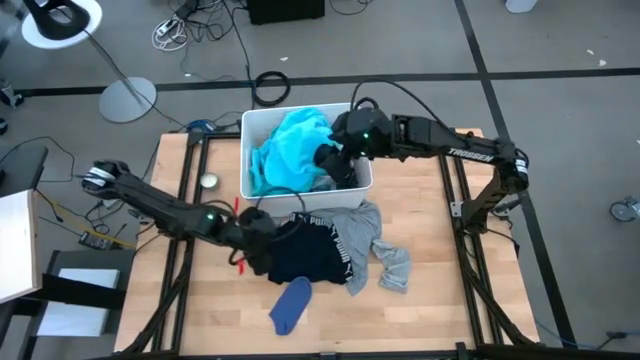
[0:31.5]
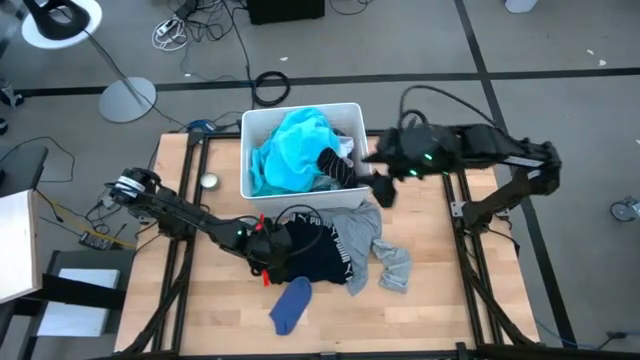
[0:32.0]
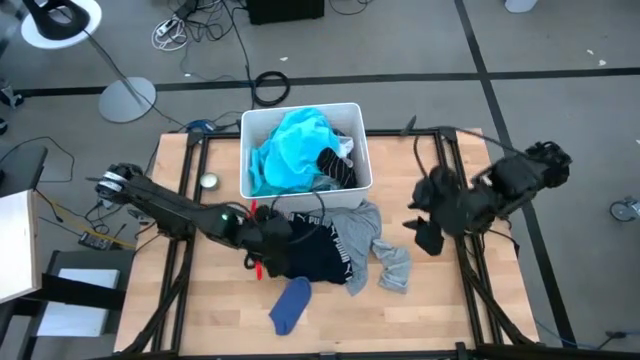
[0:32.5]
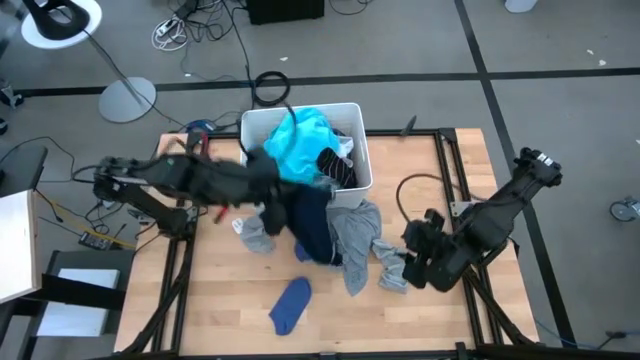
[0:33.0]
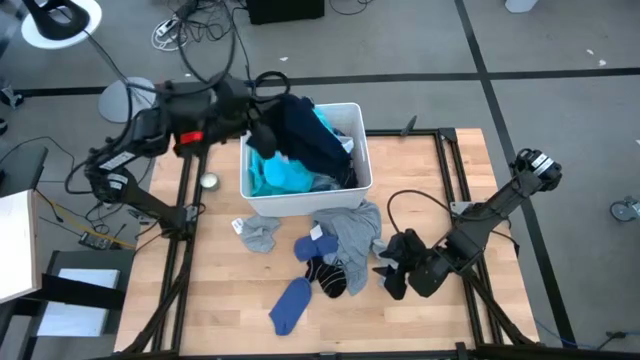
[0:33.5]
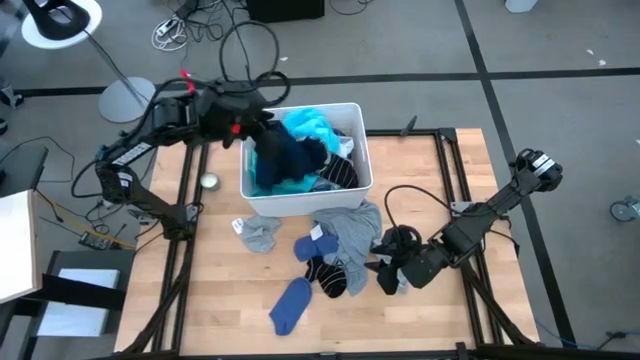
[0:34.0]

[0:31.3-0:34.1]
Task: Sort clothes
Put the black boxers into the white bin

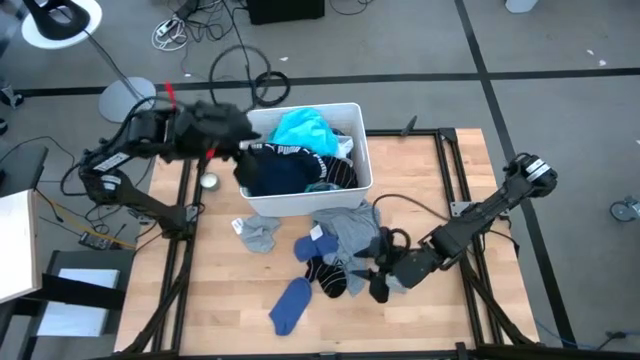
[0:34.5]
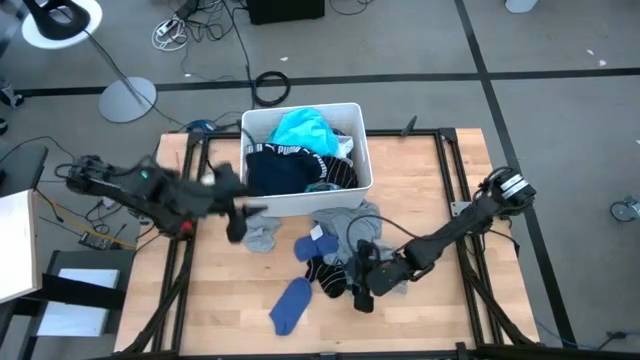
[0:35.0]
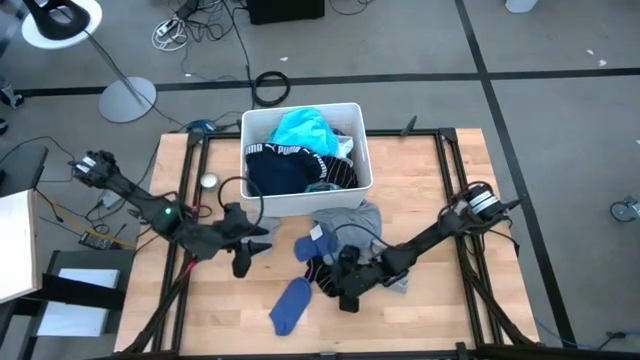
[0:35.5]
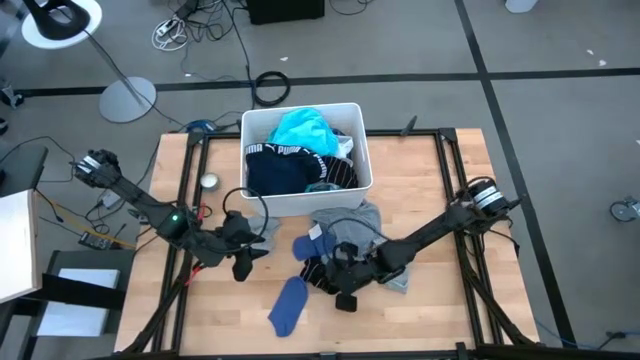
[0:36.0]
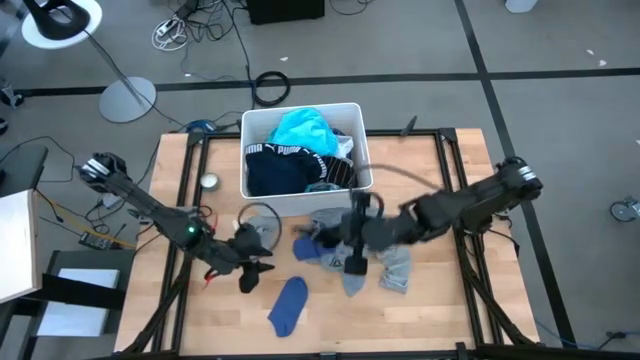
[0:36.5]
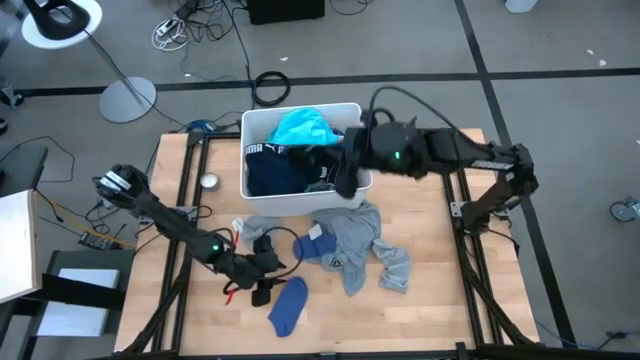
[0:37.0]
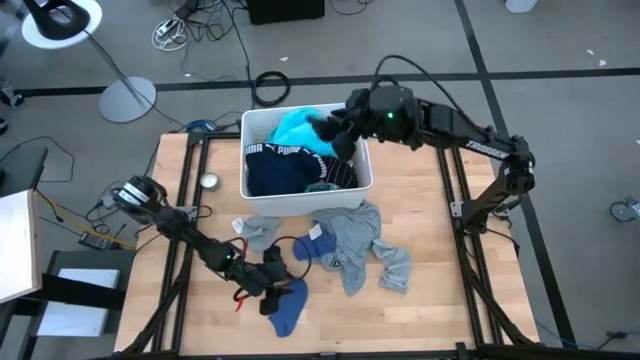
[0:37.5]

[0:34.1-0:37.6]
Put the black sock into the white bin

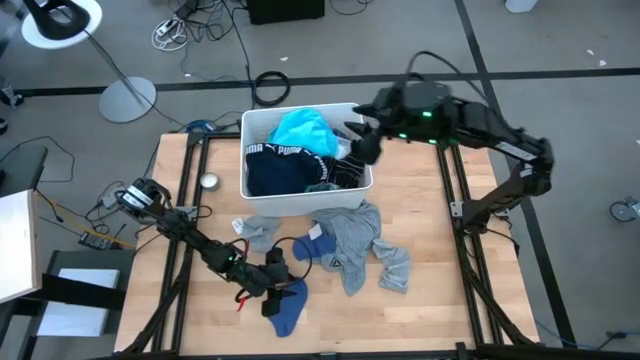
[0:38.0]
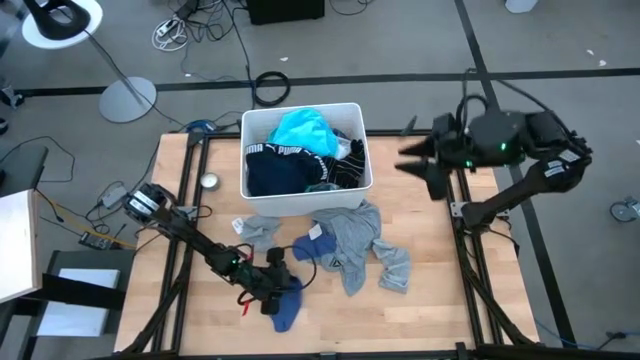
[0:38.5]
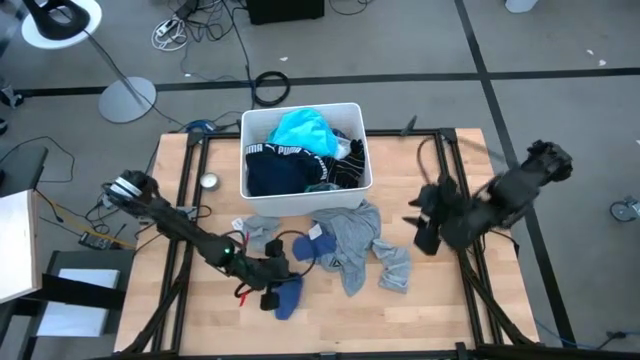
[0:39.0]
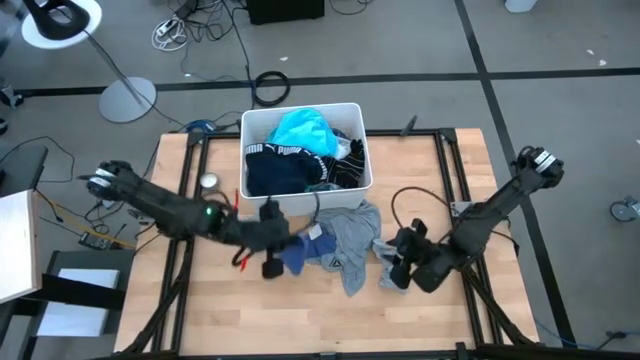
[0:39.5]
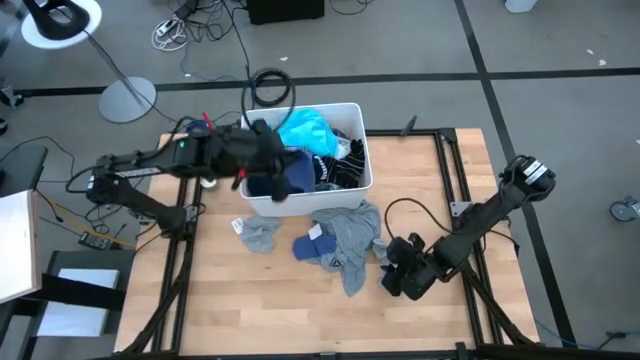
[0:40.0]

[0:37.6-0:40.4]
Put the blue sock into the white bin

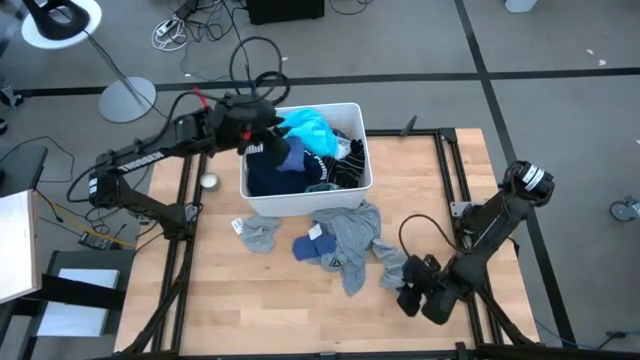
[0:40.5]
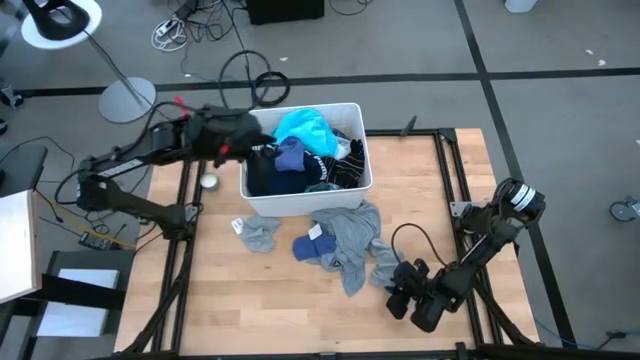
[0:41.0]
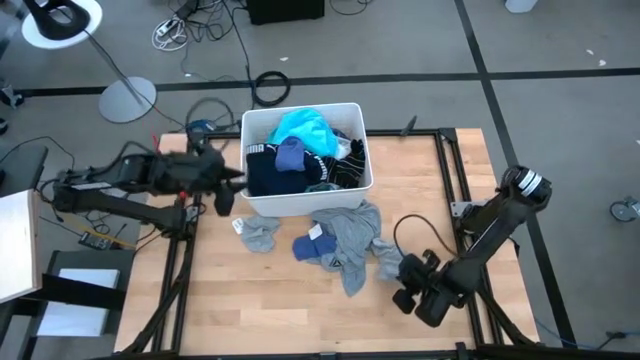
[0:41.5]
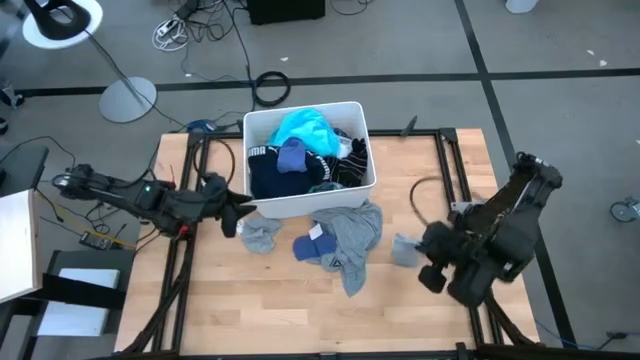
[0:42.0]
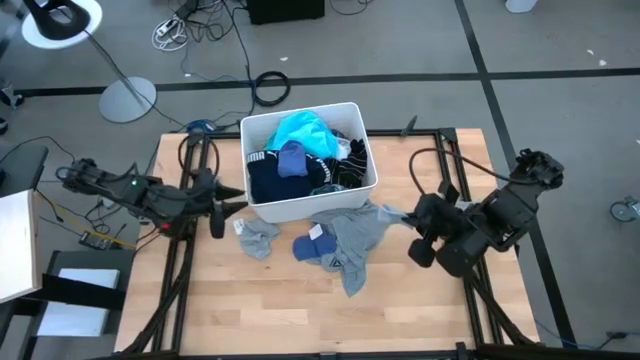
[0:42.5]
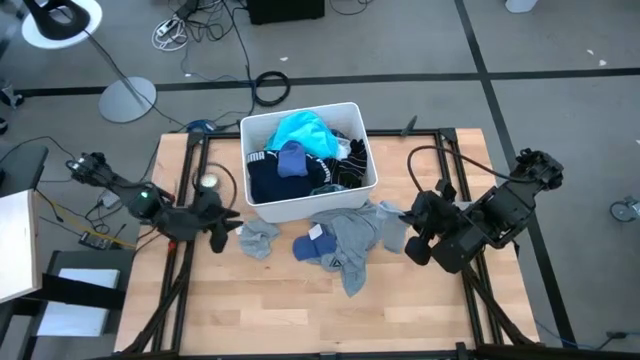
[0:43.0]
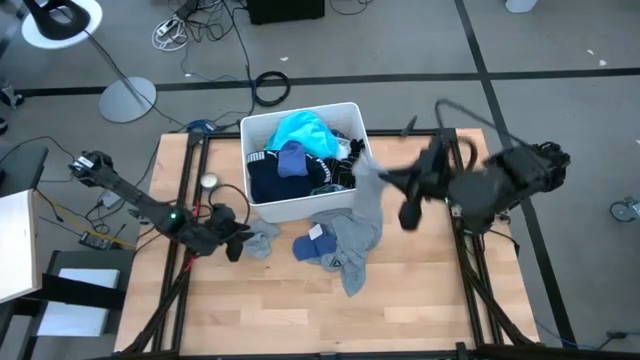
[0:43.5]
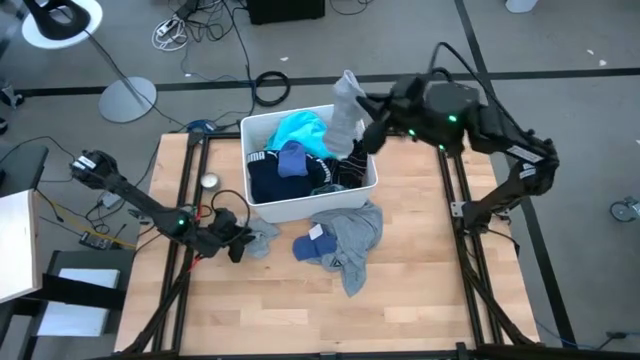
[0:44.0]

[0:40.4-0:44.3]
Put the gray sock into the white bin

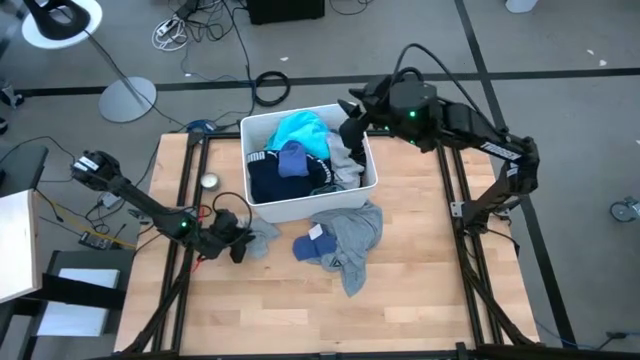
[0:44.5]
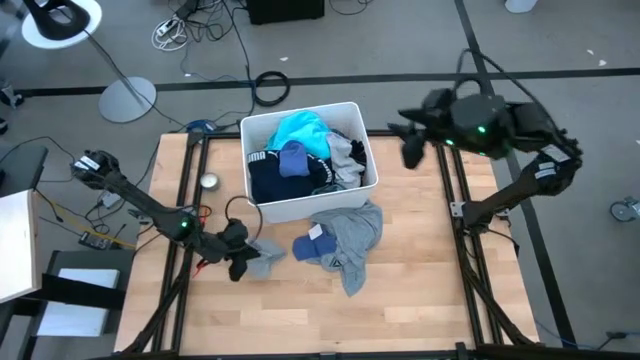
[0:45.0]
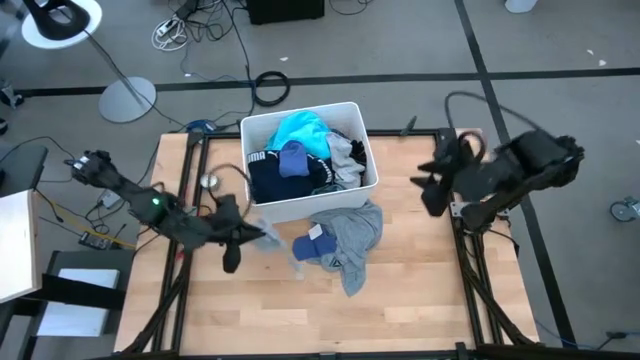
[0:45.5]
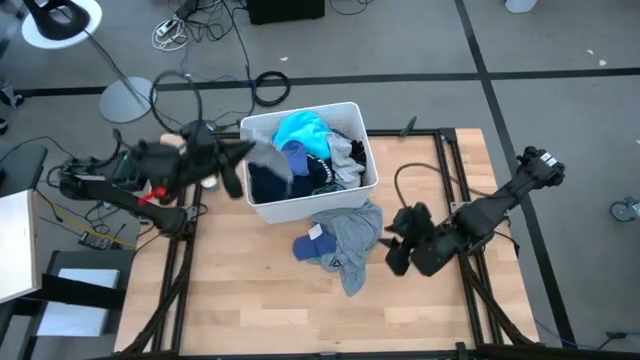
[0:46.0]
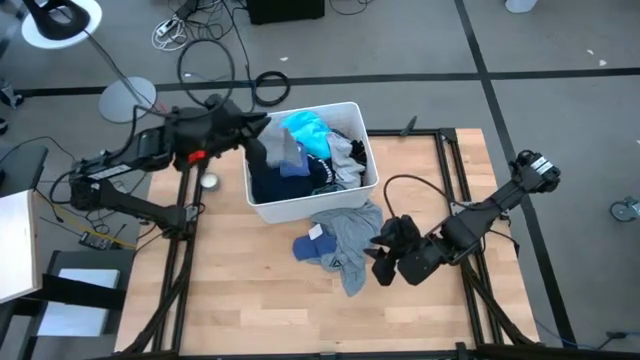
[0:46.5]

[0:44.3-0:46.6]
Put the gray sock into the white bin

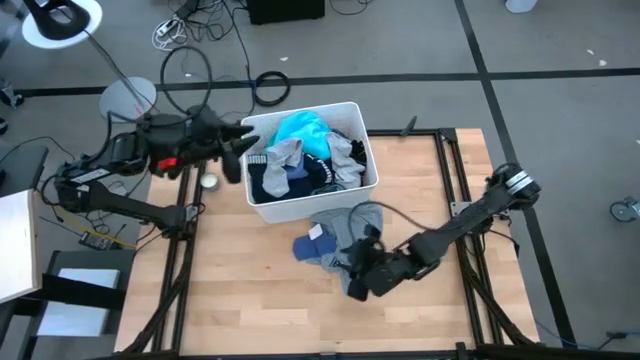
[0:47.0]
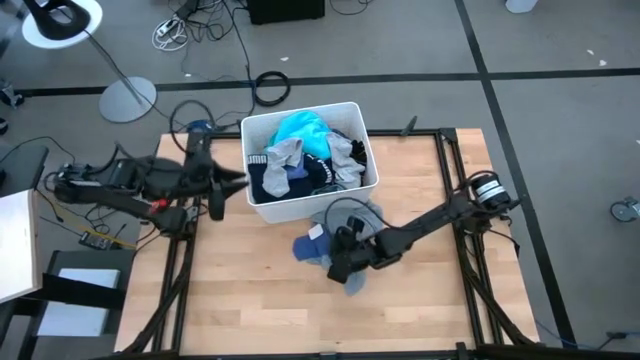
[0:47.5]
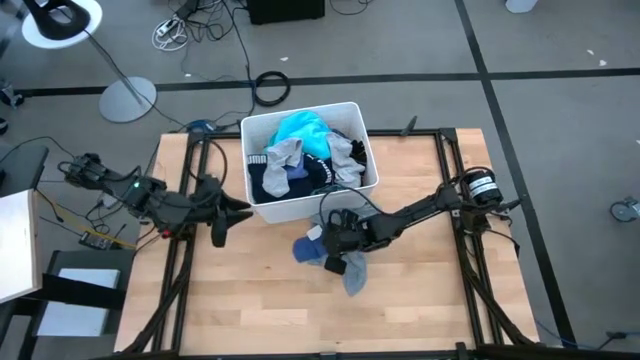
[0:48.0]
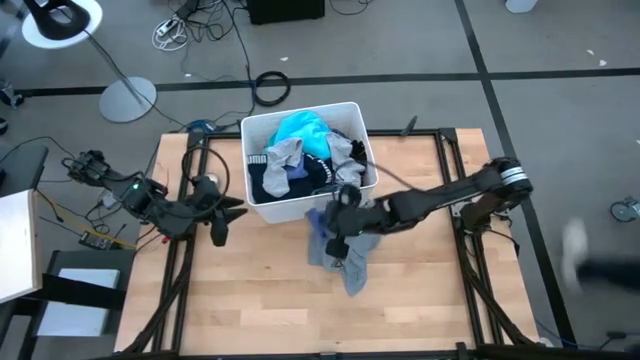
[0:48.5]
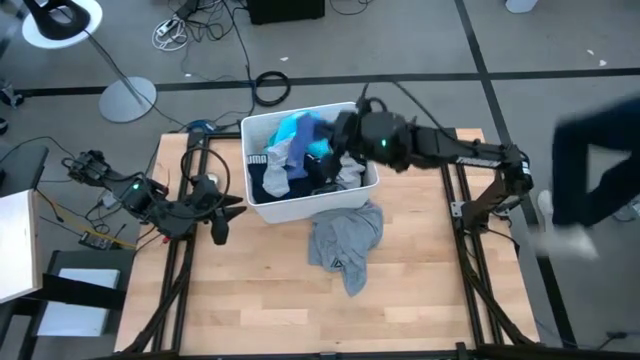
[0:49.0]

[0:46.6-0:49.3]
Put the blue sock into the white bin

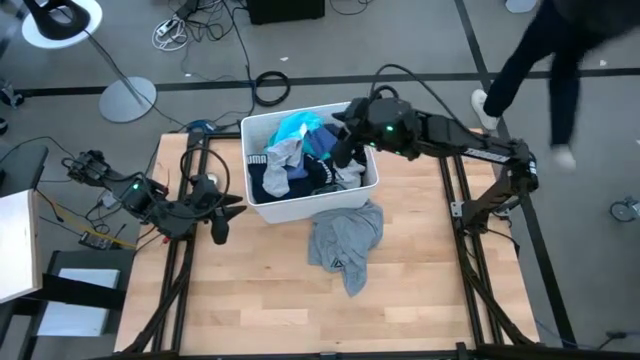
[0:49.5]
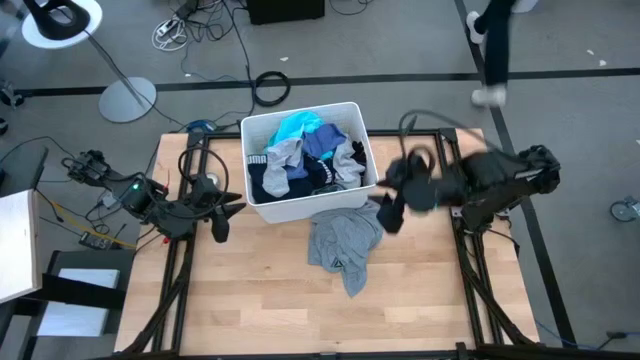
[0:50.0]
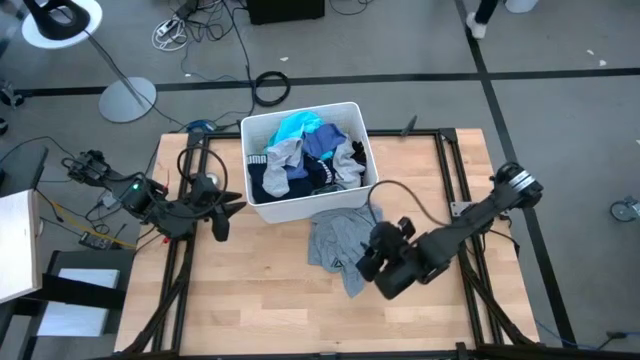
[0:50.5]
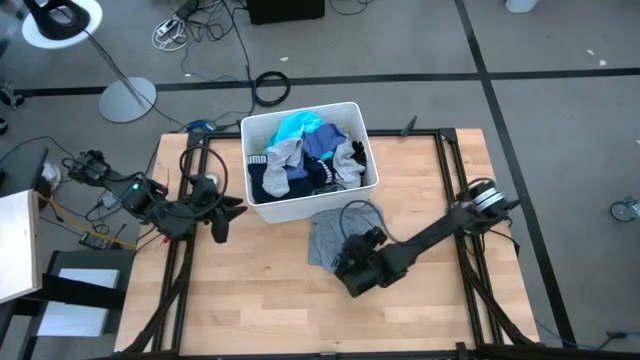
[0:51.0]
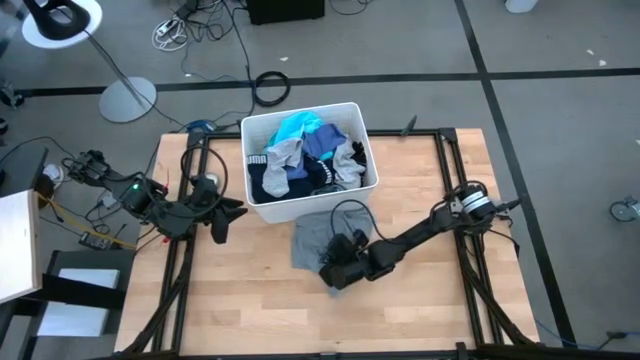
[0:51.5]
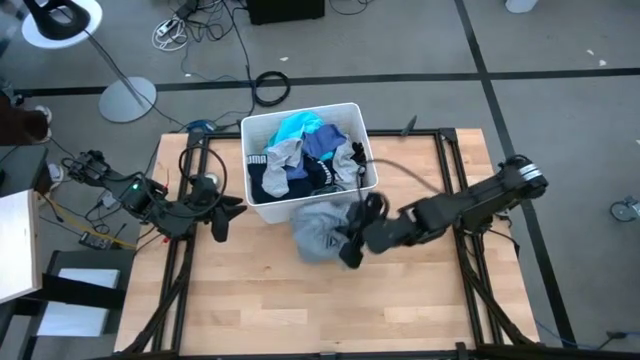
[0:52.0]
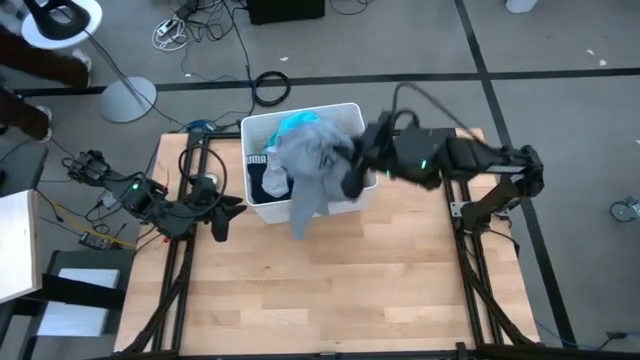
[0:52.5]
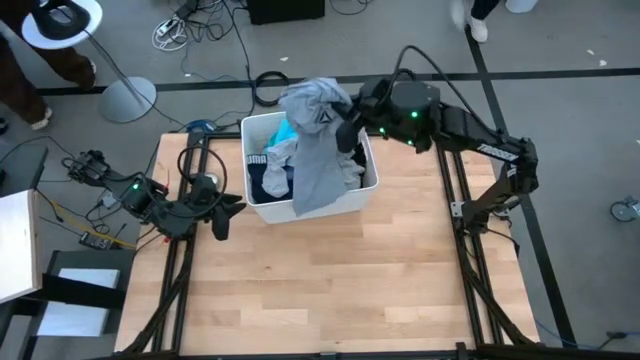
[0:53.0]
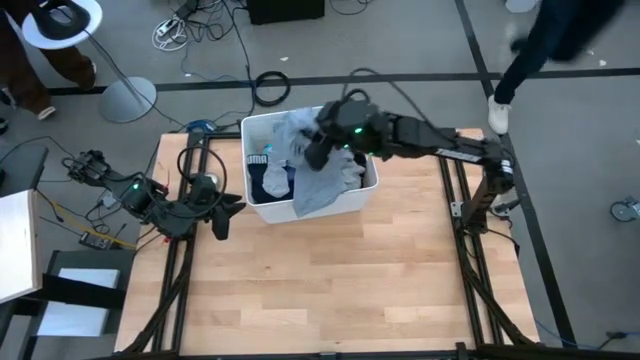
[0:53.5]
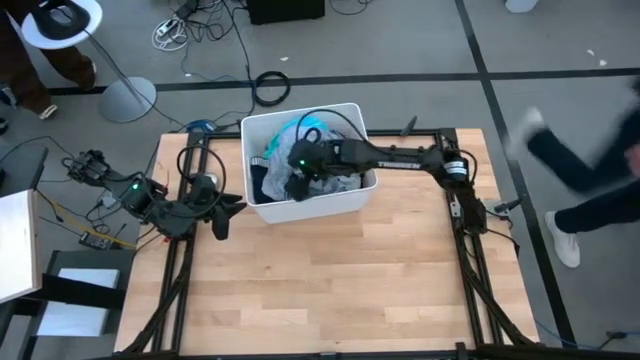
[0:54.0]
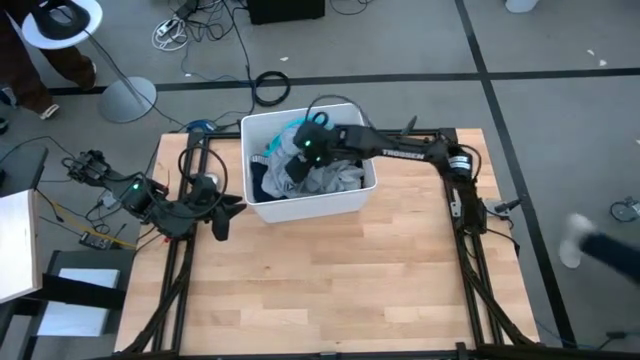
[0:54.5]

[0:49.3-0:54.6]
Put the gray shirt into the white bin
